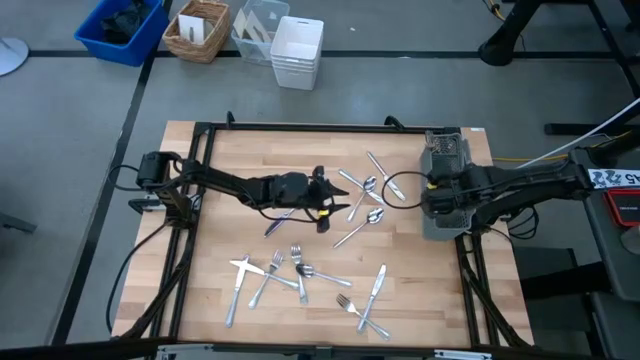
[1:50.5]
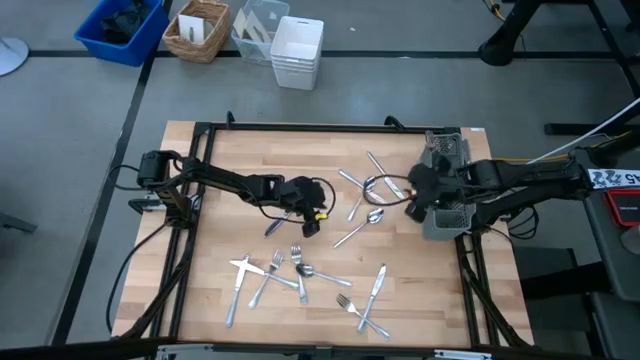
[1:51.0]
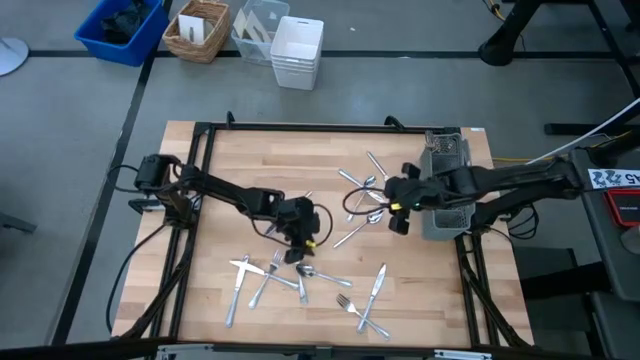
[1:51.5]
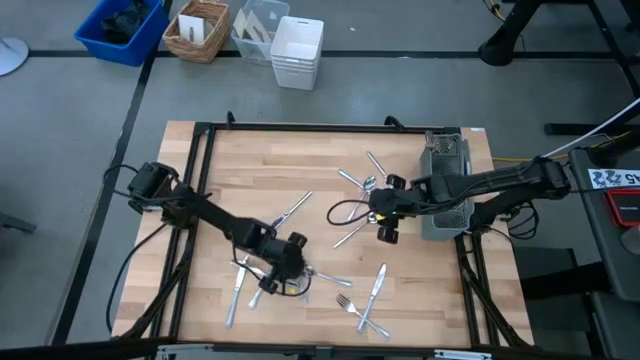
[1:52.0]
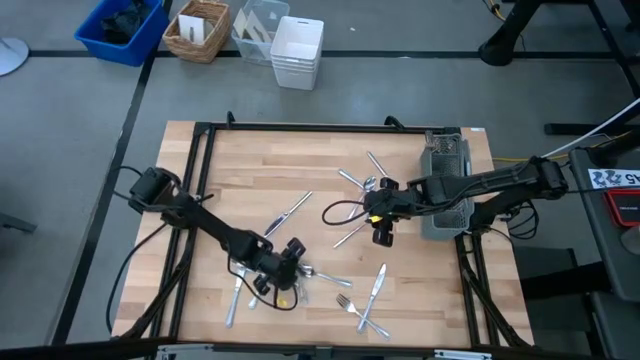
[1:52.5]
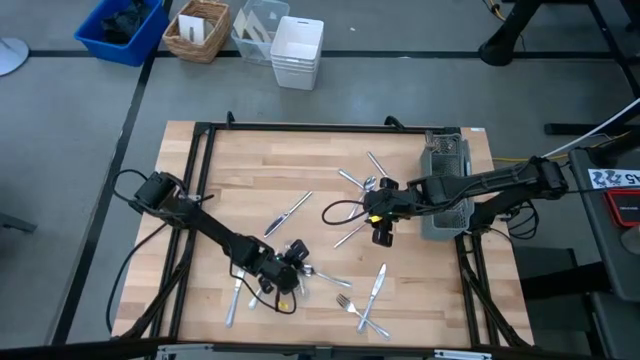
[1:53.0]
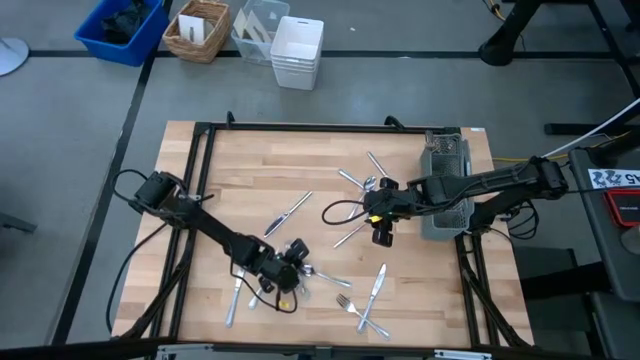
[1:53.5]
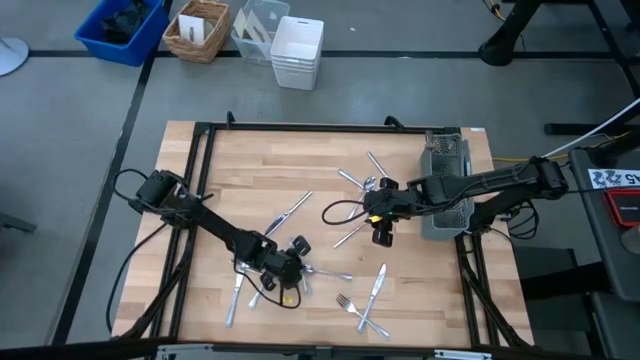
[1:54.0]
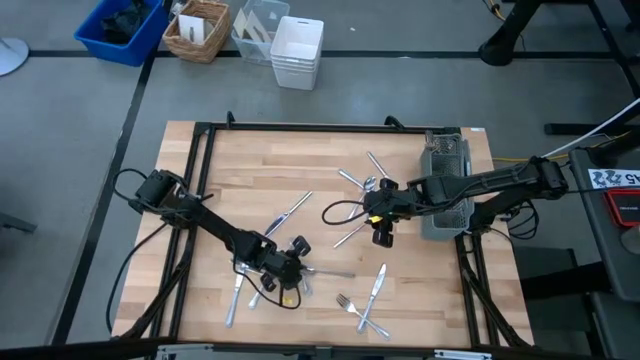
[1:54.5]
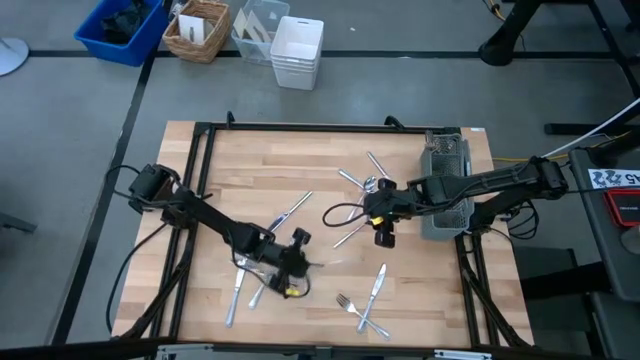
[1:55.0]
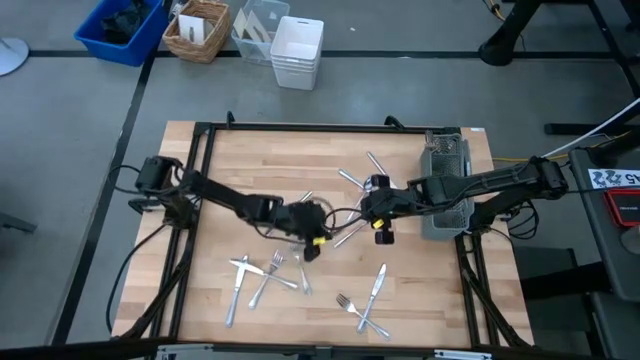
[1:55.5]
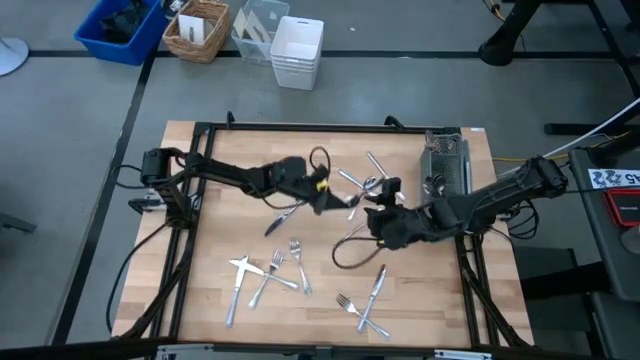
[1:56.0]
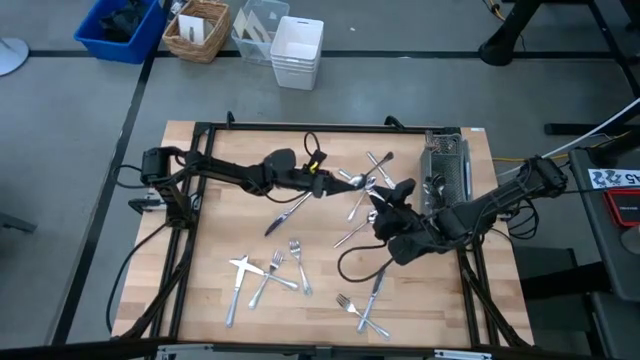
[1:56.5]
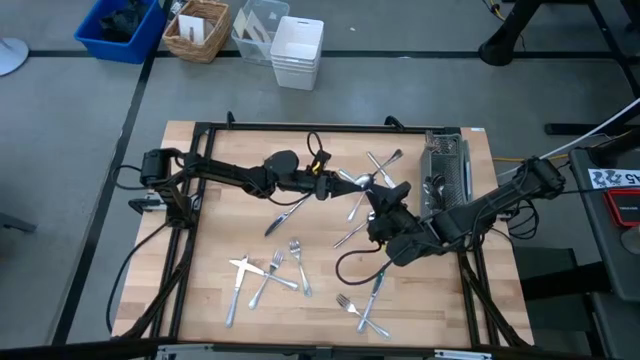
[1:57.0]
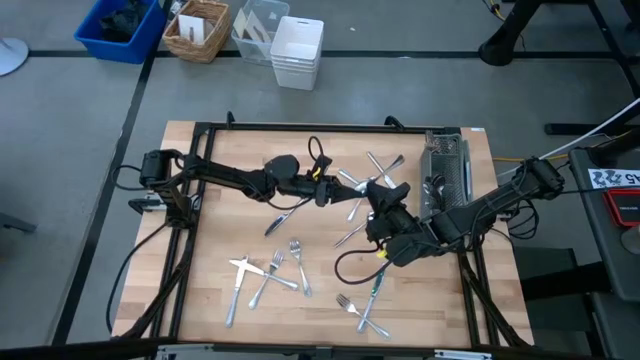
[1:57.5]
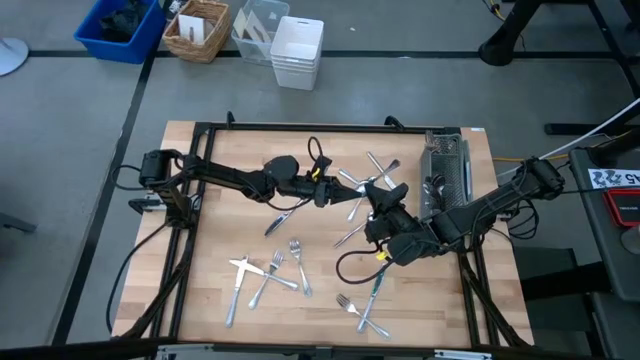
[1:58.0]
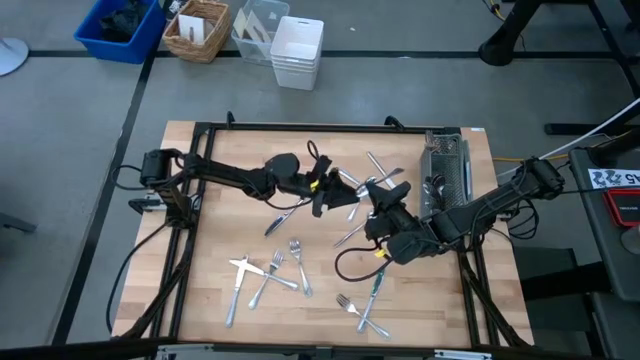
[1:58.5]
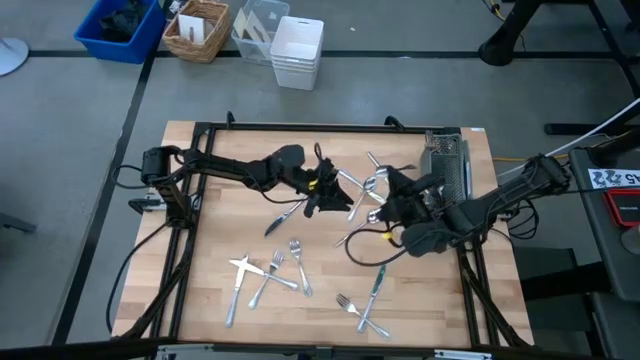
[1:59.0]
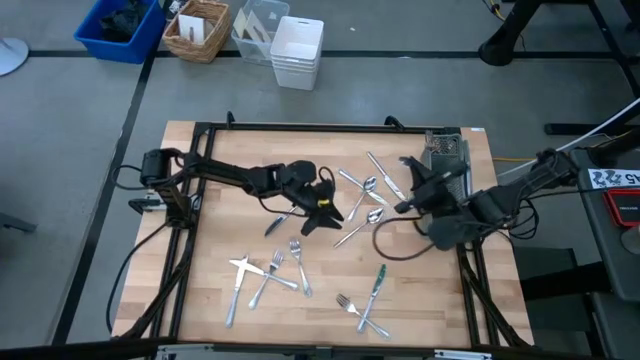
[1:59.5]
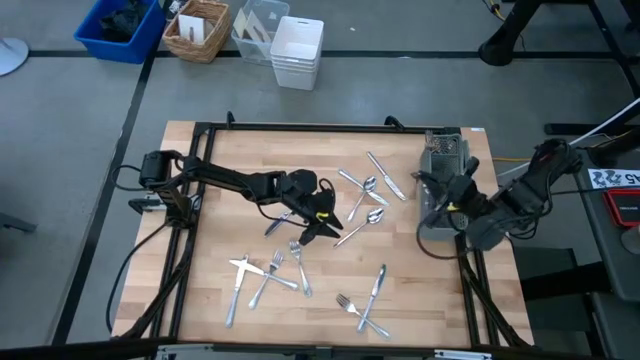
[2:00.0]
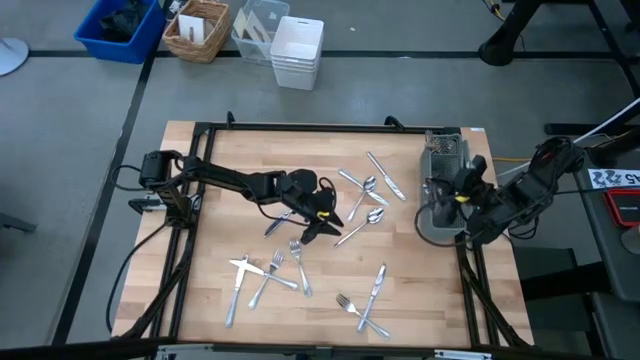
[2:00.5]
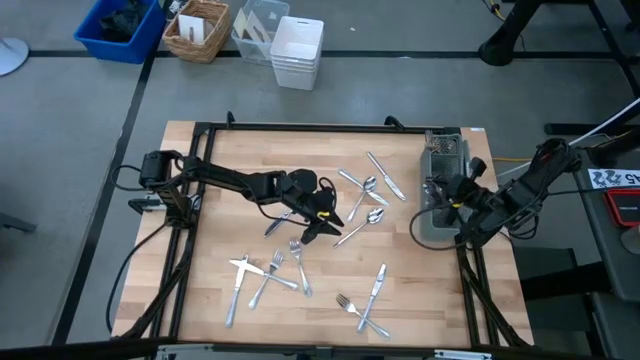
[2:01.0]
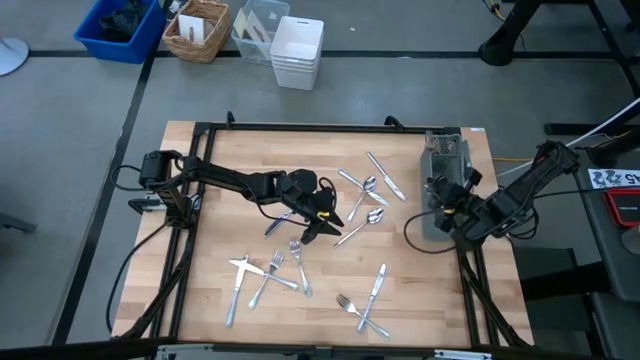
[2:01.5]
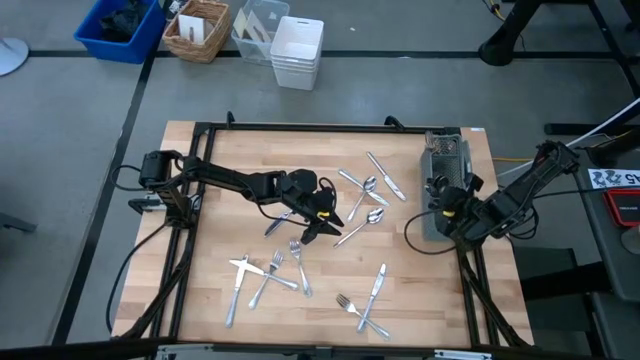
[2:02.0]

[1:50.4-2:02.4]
Task: Sort silverware
Put the bottom spoon into the bottom section of the utensil holder

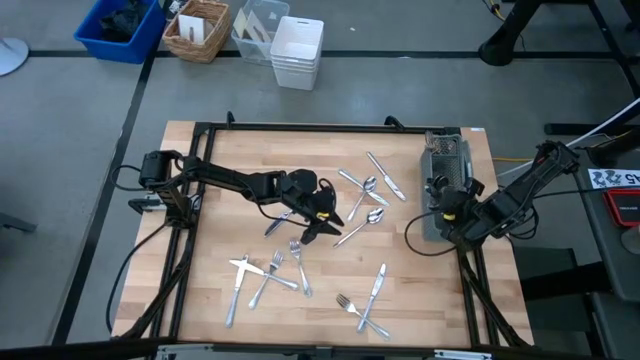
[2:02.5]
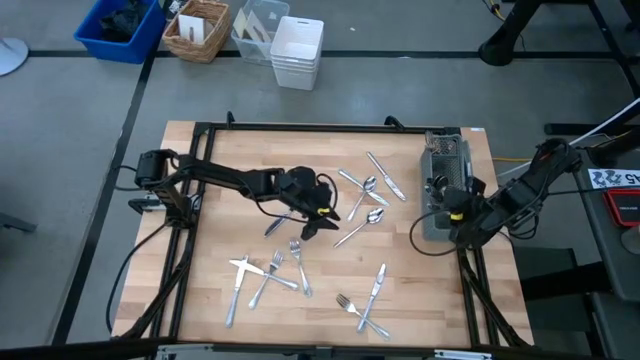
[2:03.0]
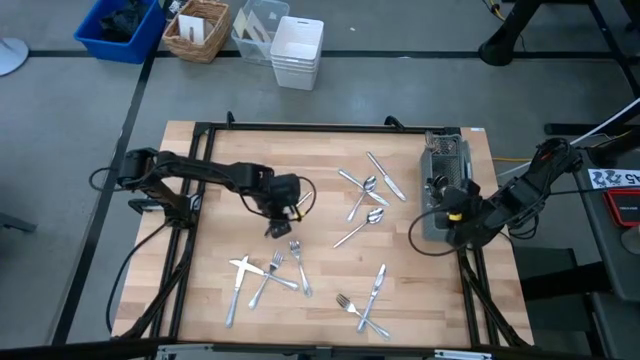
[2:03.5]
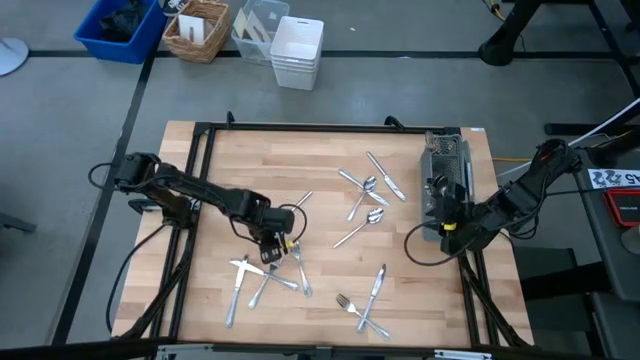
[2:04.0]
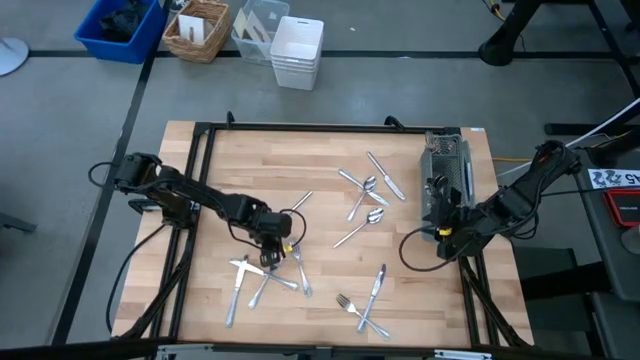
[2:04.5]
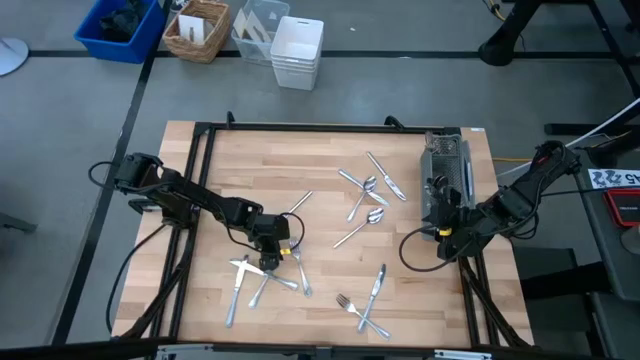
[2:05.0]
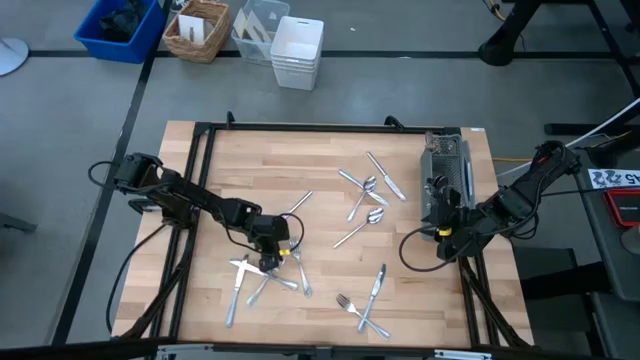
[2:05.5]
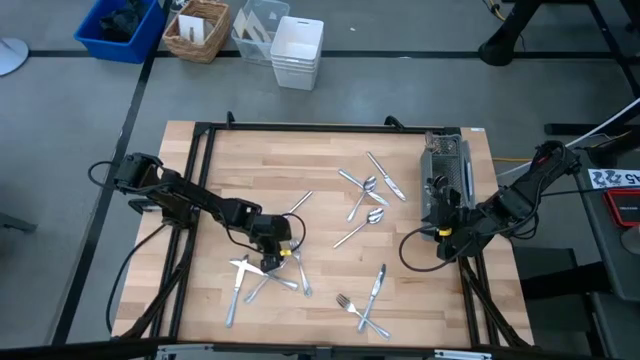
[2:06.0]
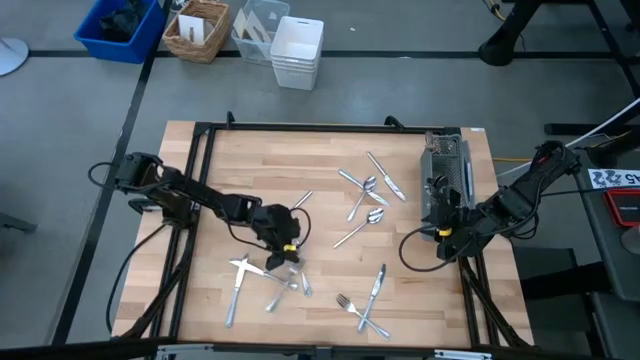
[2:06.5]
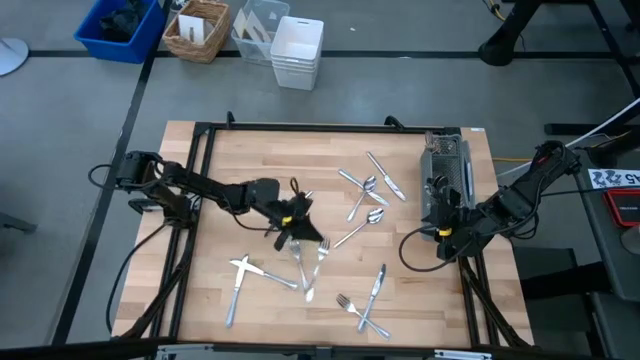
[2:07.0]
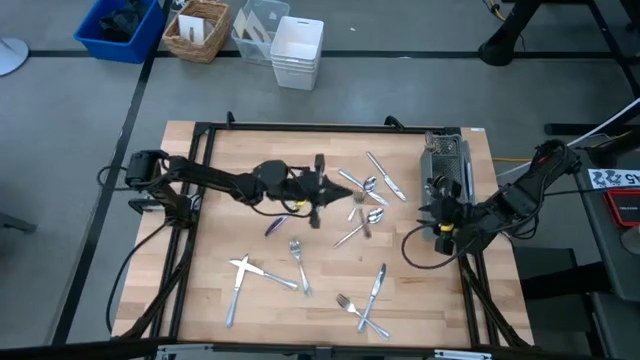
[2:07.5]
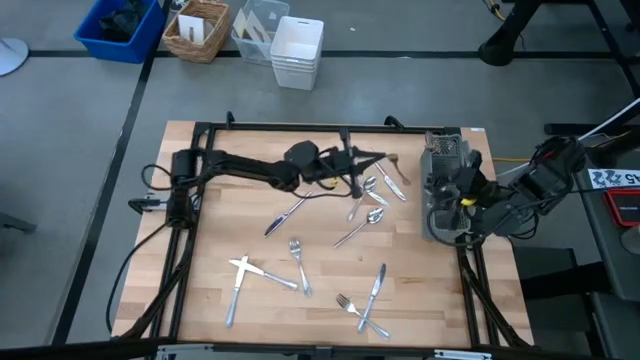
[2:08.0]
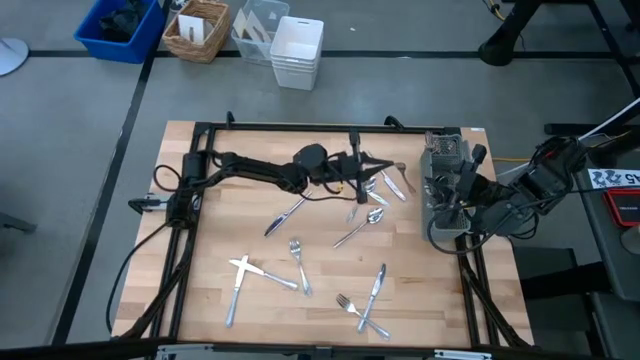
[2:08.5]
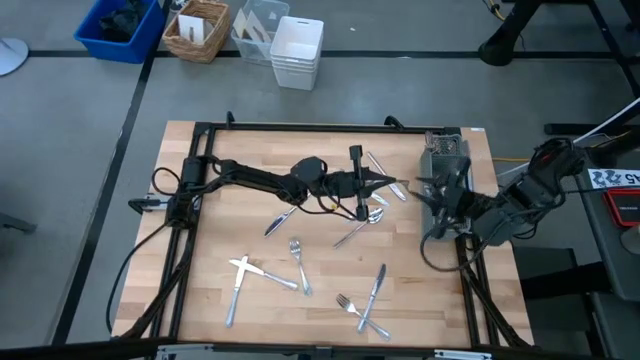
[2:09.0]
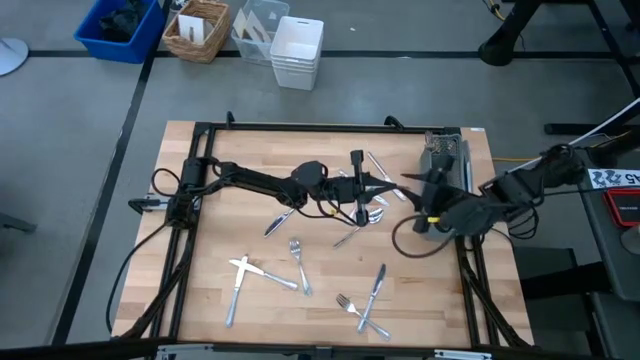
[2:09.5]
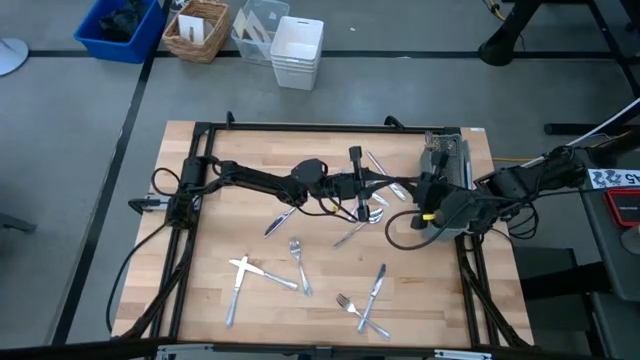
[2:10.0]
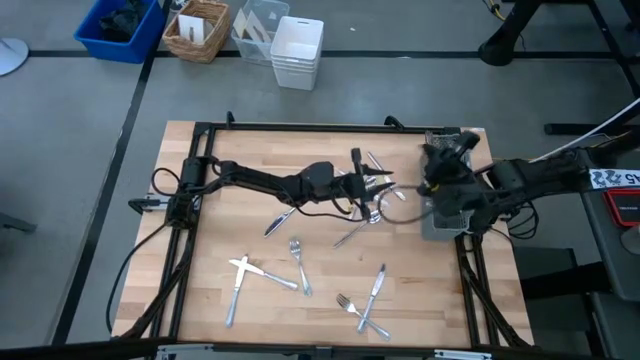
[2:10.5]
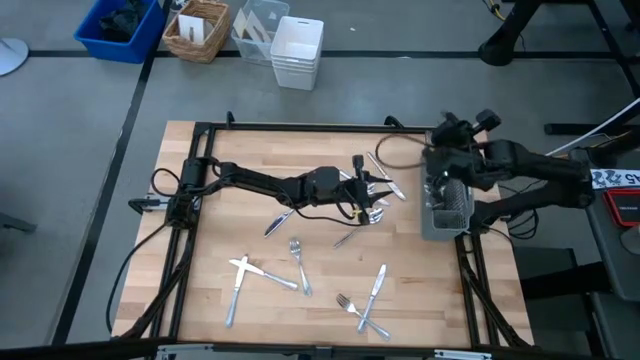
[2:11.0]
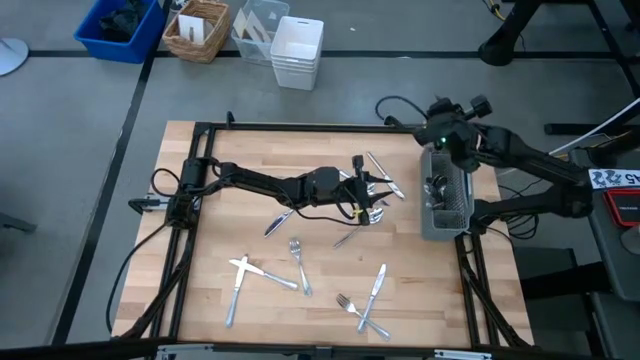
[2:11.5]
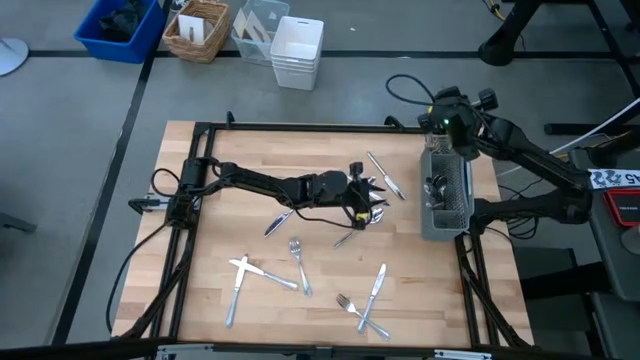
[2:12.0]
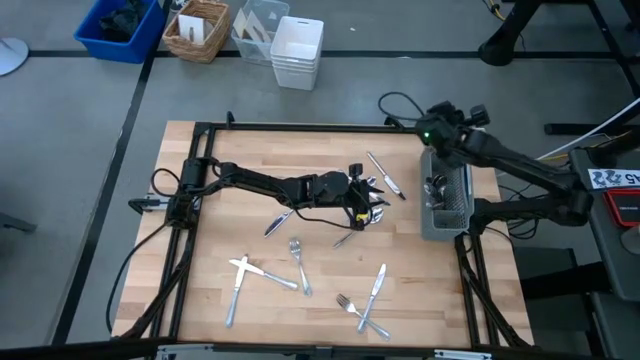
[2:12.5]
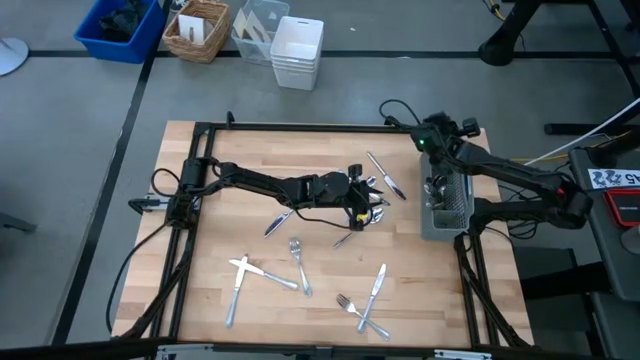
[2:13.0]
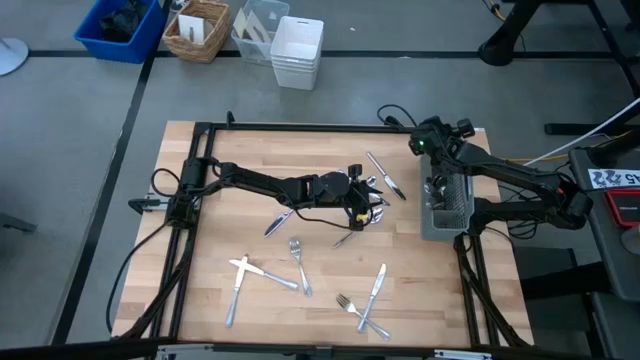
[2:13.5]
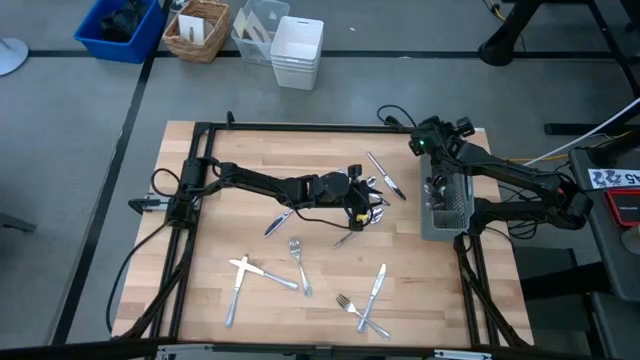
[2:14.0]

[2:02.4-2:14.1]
Put the left fork into the left section of the utensil holder
